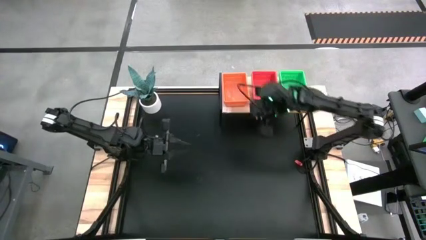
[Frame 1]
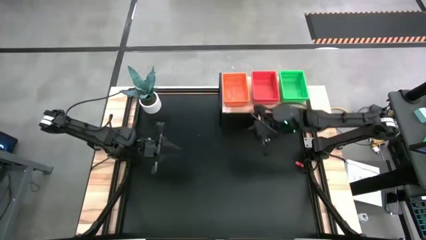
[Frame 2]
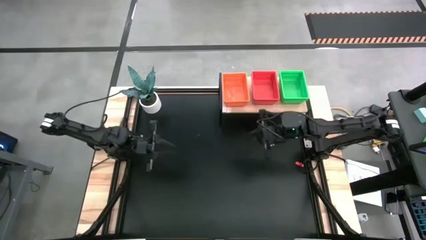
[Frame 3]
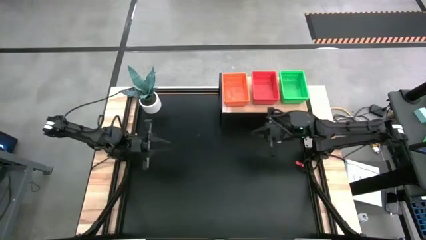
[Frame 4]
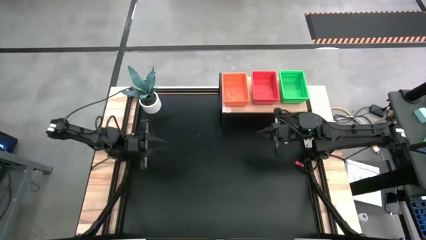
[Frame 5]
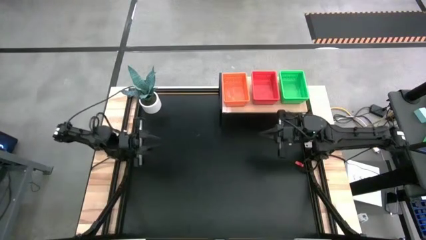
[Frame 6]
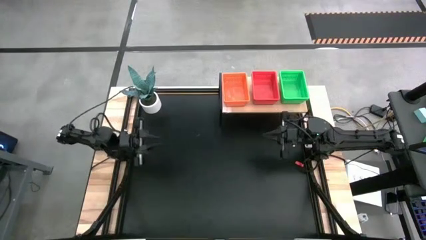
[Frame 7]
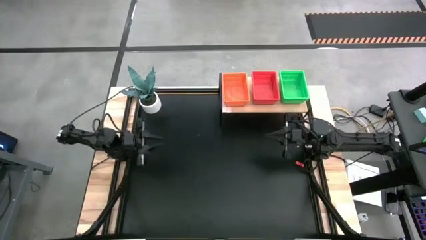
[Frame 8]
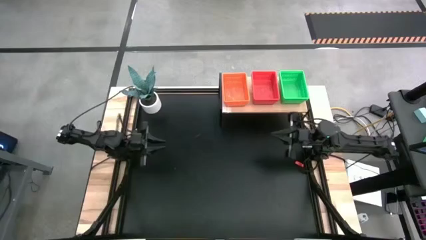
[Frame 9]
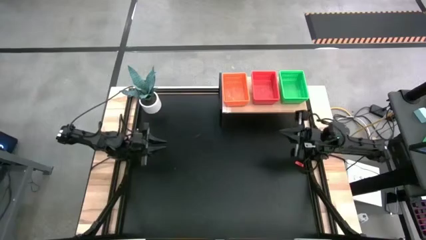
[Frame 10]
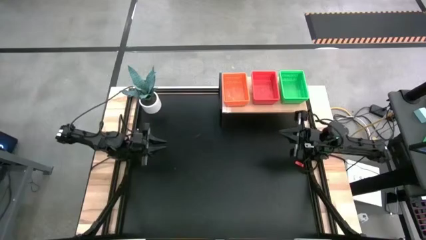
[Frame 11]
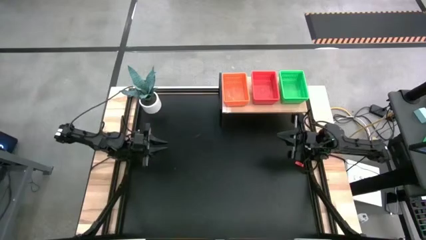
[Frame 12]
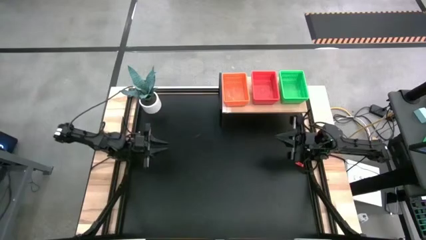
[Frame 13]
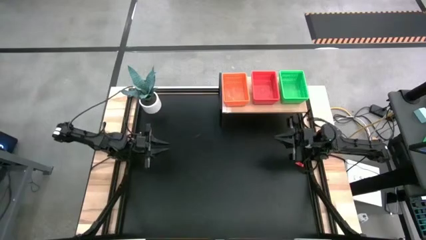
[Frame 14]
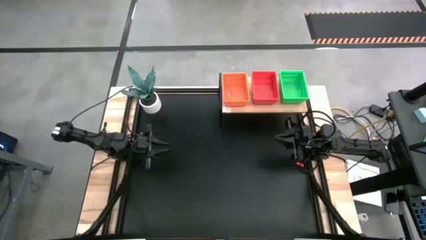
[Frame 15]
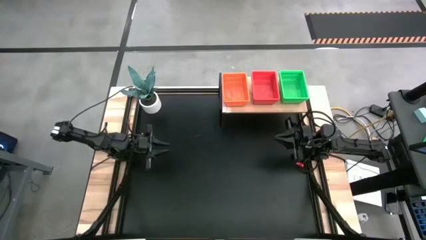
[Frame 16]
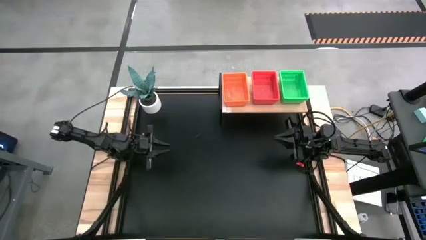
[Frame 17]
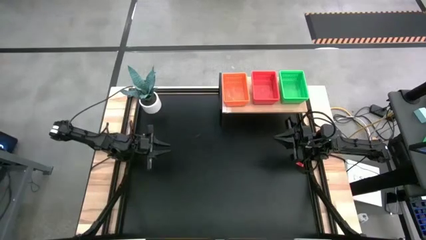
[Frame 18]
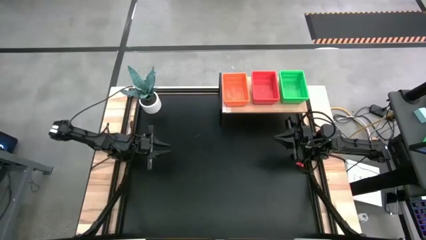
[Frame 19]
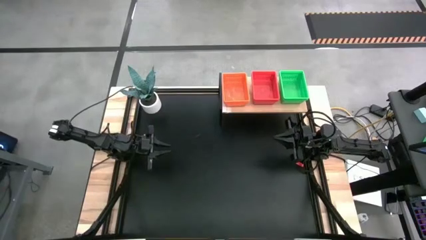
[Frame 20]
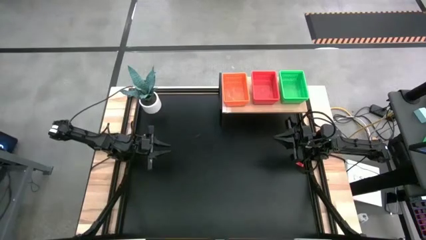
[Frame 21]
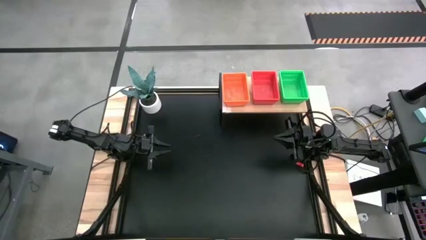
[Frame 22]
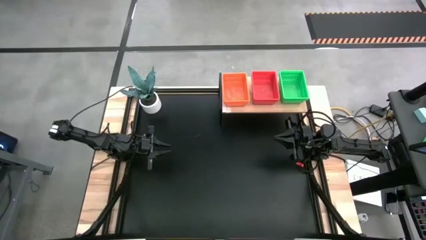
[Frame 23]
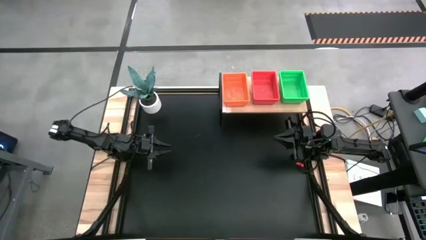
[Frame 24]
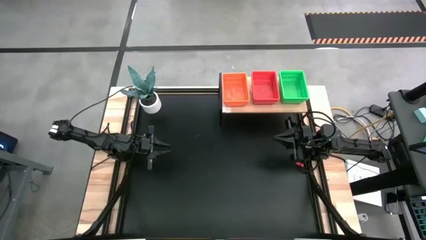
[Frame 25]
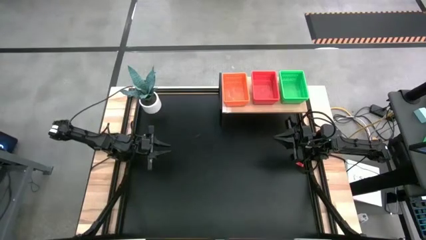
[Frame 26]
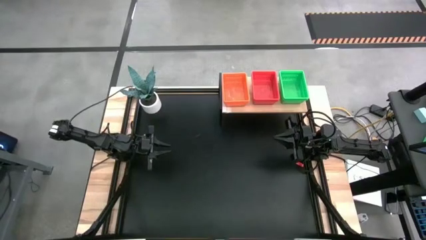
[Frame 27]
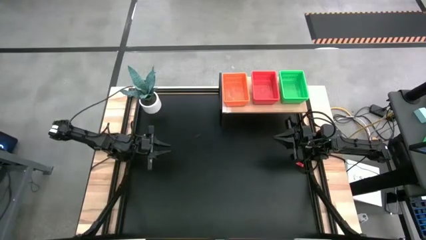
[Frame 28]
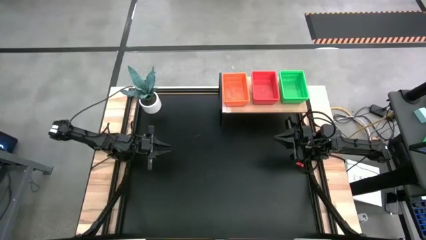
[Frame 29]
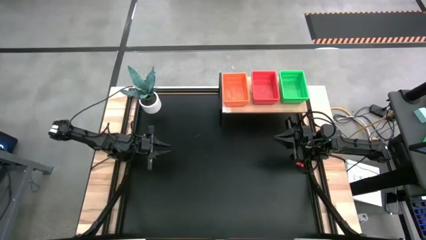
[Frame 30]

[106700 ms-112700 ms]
Task: Stack baskets on shelf by color
Return to Home Position

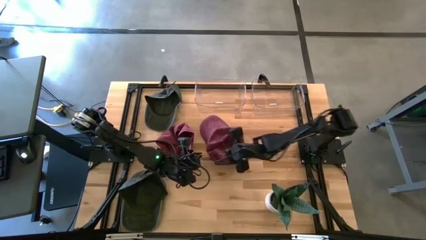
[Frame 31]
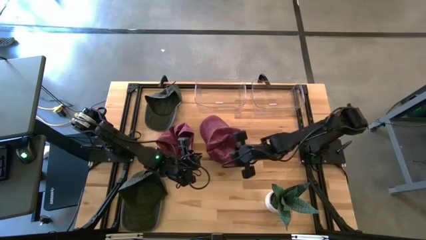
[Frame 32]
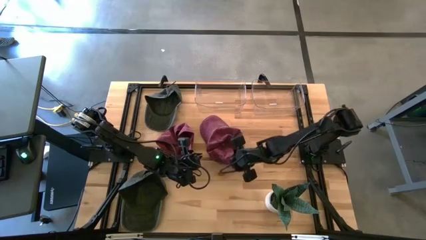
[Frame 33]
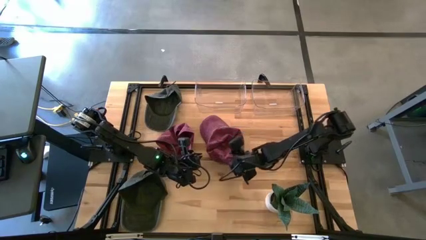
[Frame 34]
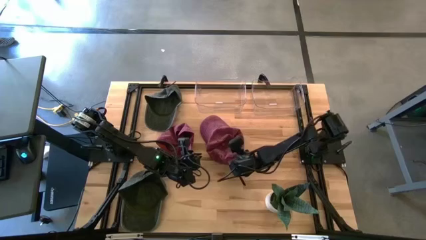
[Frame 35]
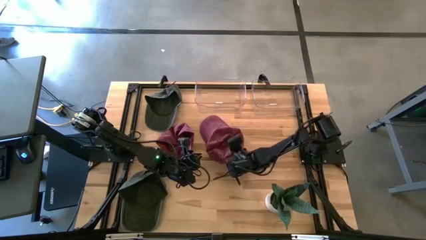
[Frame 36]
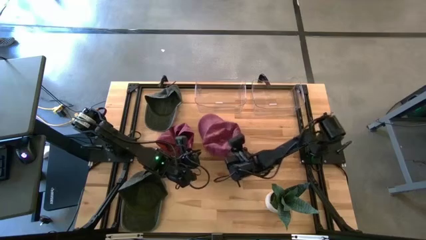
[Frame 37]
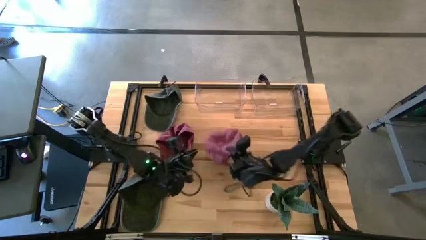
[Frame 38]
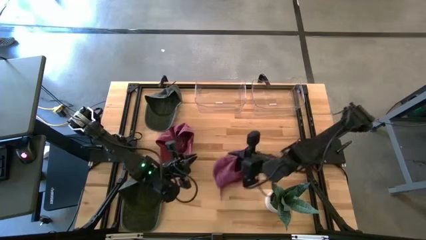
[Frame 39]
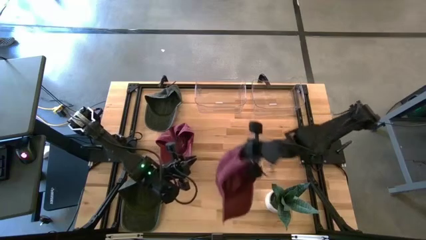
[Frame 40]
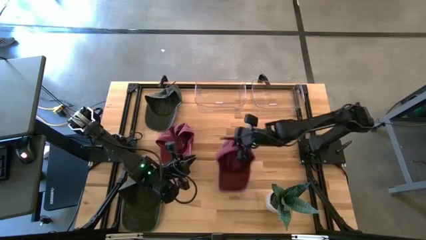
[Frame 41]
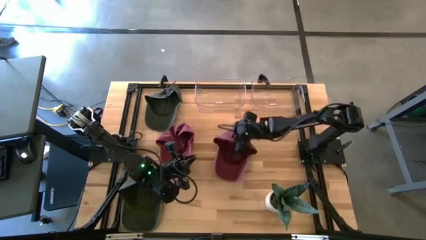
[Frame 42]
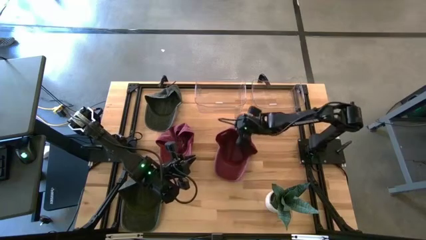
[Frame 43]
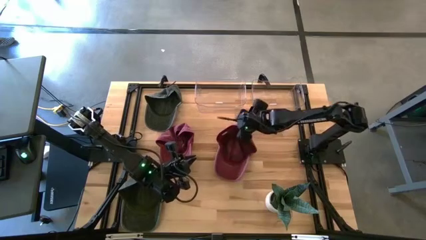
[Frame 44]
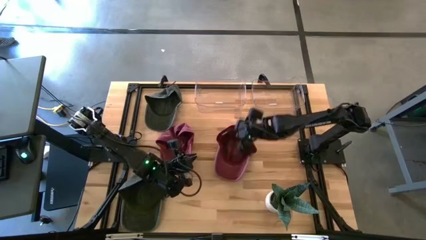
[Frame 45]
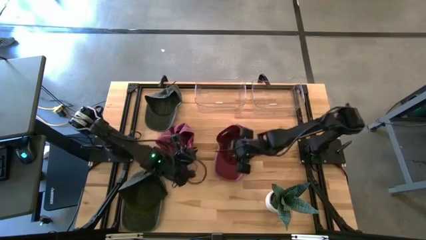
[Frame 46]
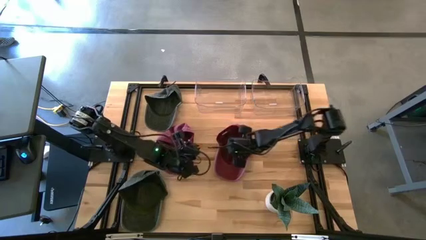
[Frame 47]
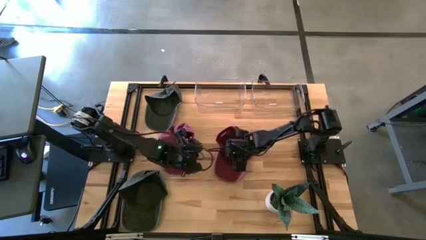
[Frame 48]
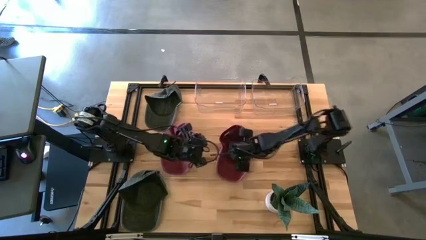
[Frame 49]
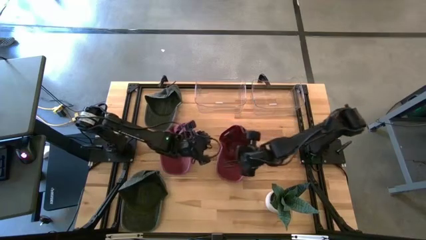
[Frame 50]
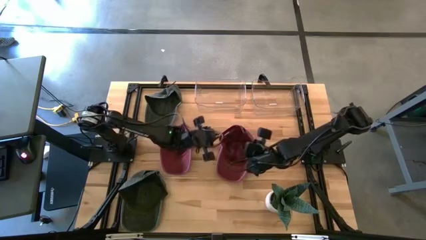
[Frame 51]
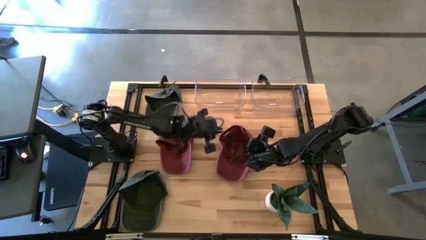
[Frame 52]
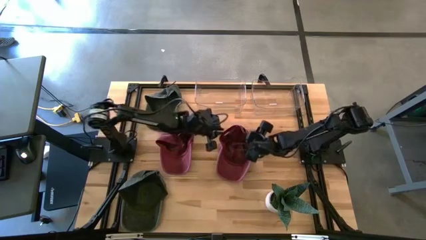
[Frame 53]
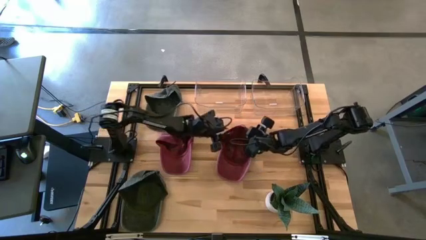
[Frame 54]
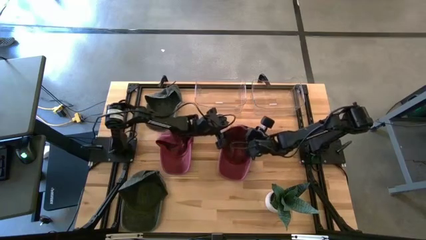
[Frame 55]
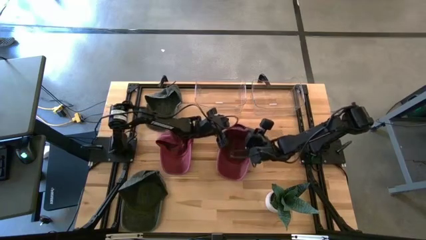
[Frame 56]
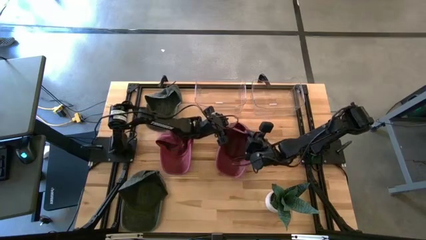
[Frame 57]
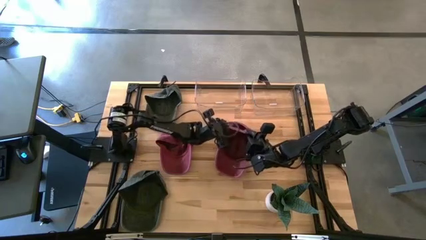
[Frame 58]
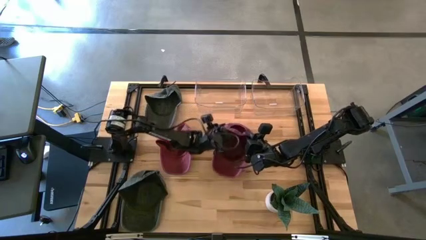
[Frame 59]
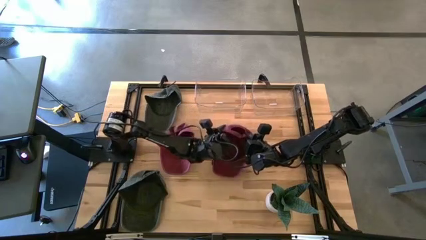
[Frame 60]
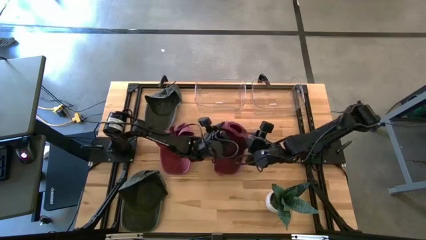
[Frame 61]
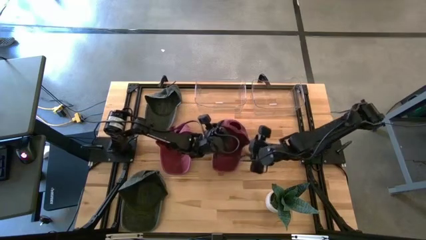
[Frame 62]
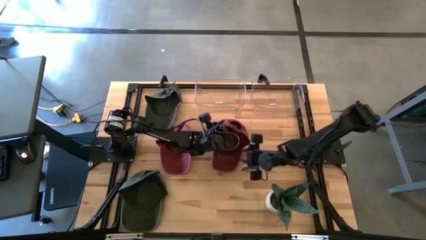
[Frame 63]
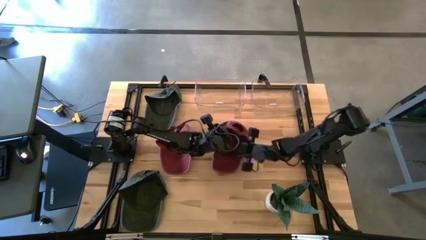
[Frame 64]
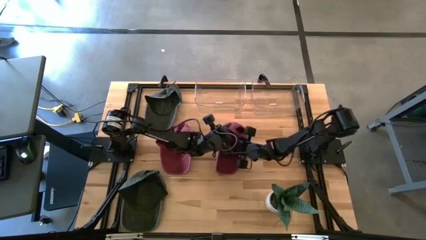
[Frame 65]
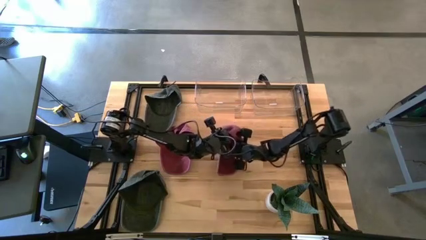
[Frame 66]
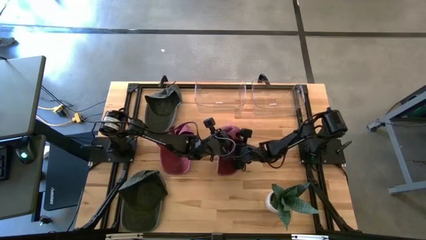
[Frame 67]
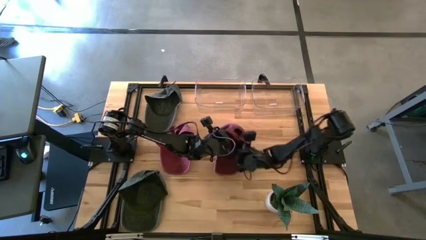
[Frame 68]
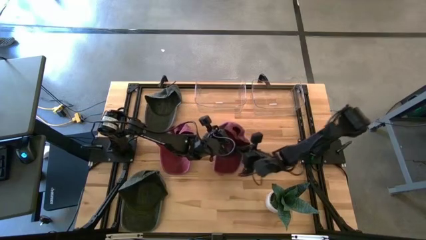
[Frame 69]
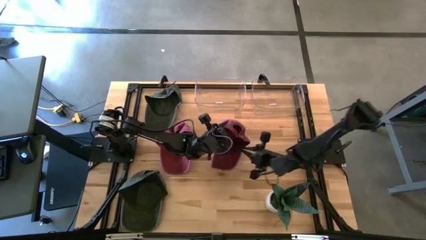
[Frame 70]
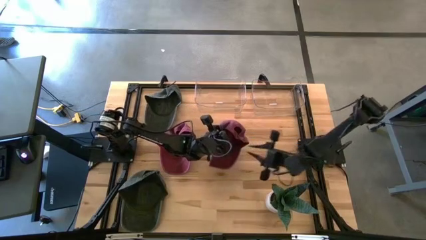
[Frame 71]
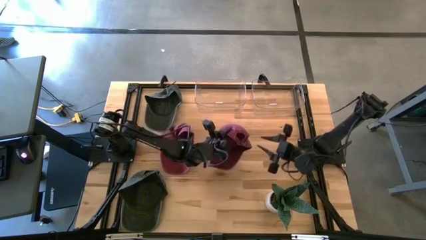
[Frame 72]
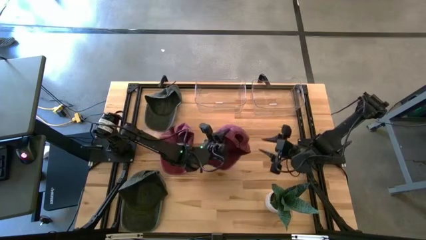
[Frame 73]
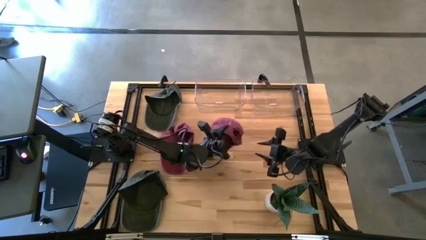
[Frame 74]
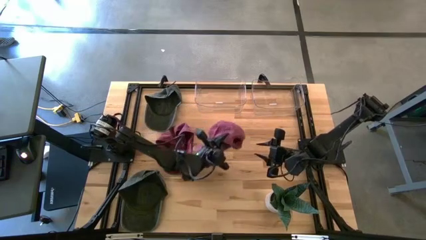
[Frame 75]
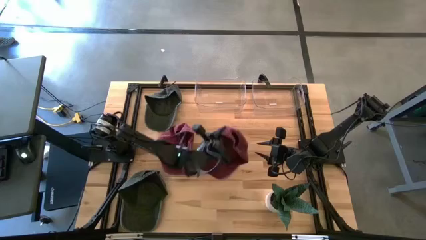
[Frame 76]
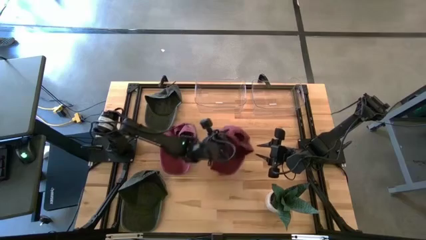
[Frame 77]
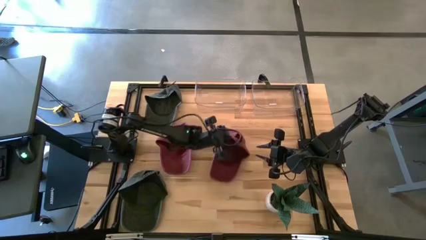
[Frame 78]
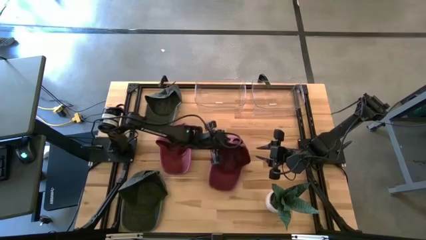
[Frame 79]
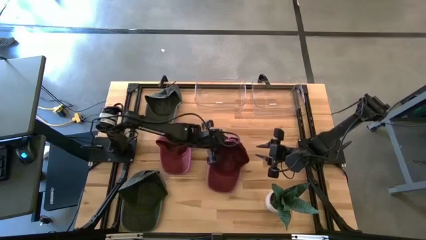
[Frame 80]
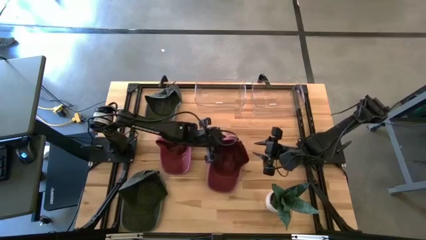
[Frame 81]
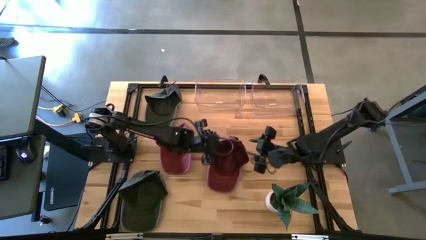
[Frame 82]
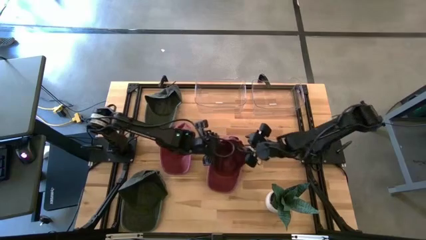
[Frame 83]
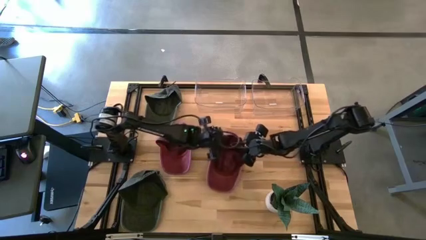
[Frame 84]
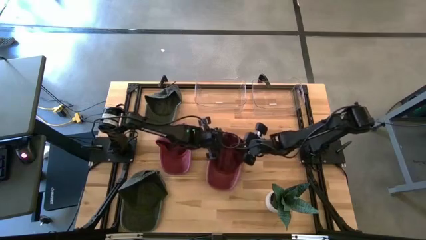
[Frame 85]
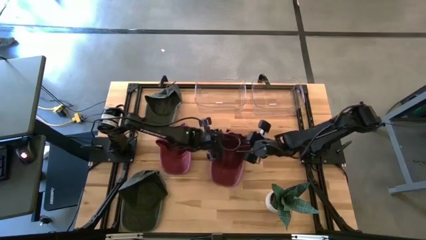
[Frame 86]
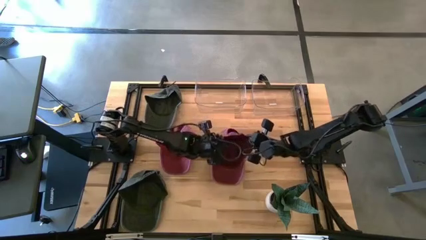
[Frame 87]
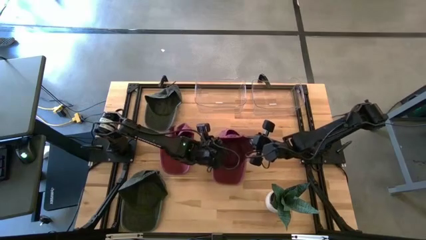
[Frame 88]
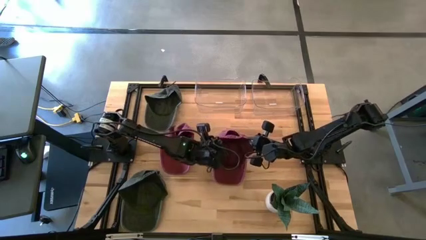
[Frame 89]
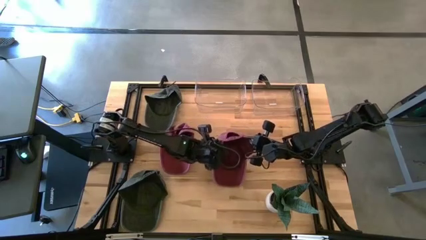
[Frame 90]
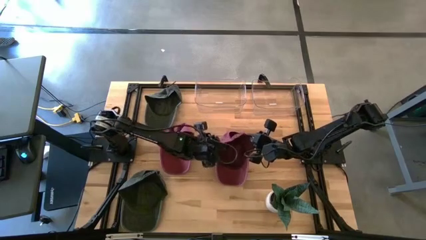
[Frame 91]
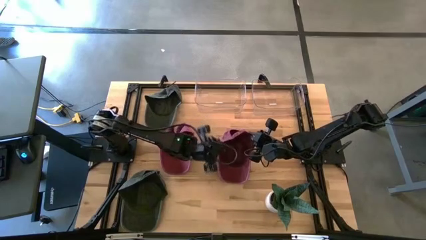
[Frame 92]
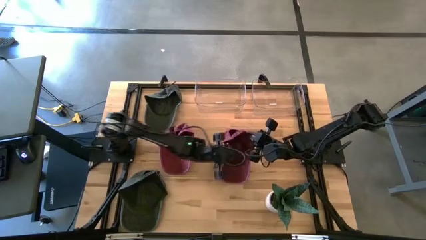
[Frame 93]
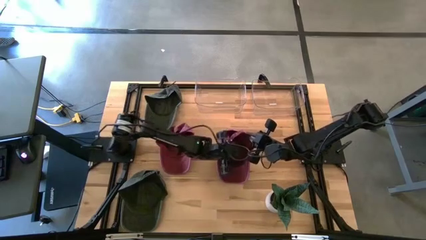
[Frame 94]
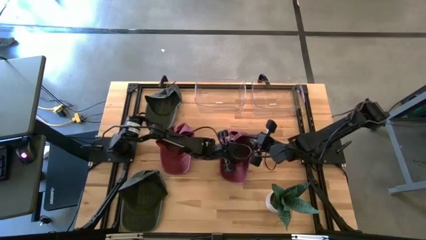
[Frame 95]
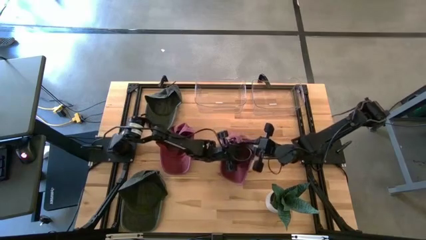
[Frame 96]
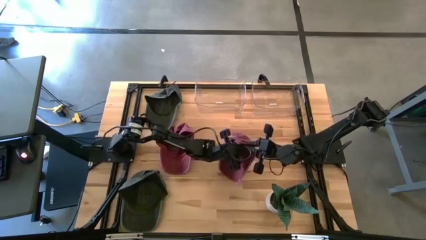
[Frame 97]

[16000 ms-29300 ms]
Task: Pick & Place hat
Put the right red cap into the left transparent bin
